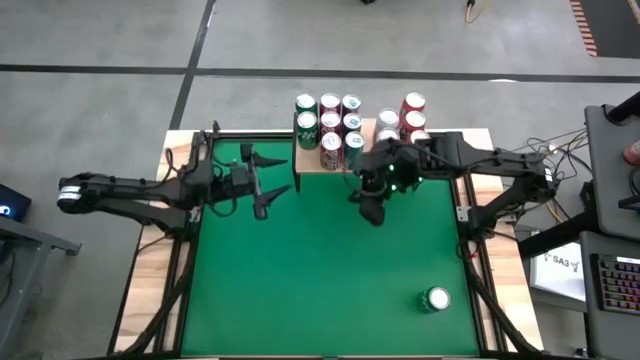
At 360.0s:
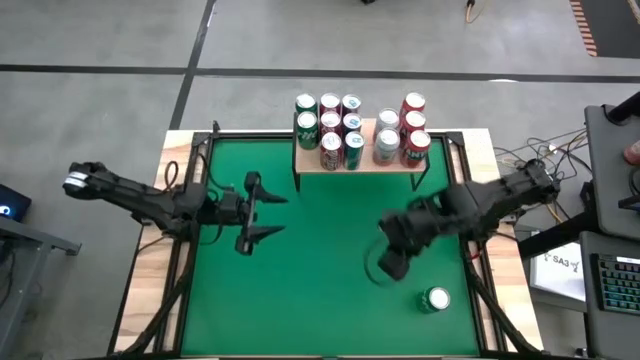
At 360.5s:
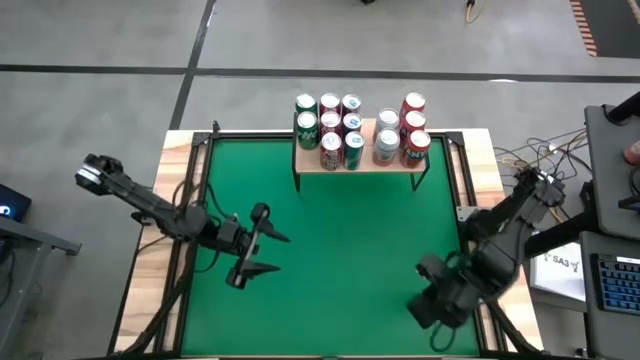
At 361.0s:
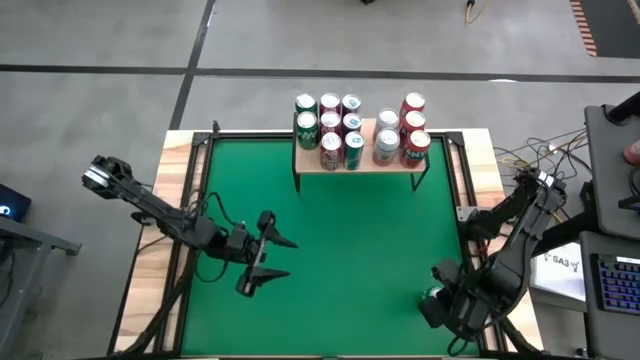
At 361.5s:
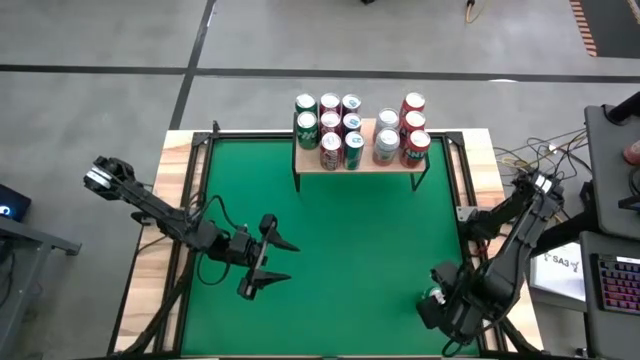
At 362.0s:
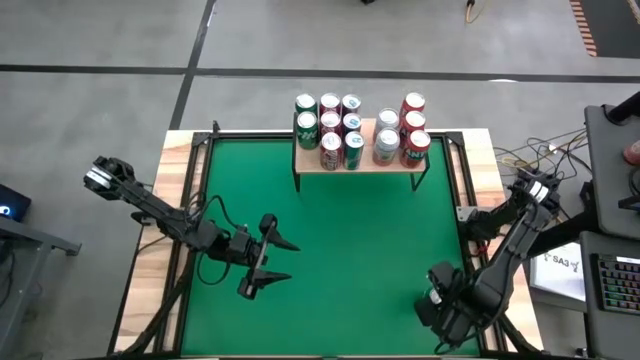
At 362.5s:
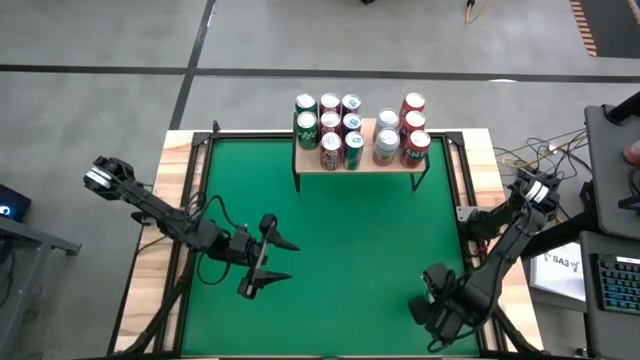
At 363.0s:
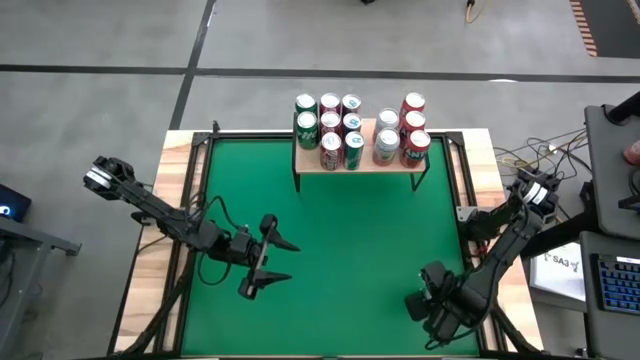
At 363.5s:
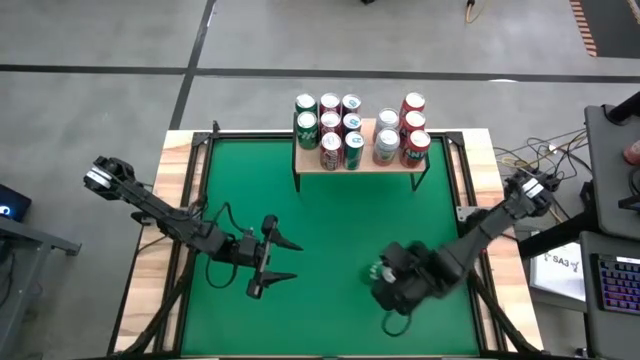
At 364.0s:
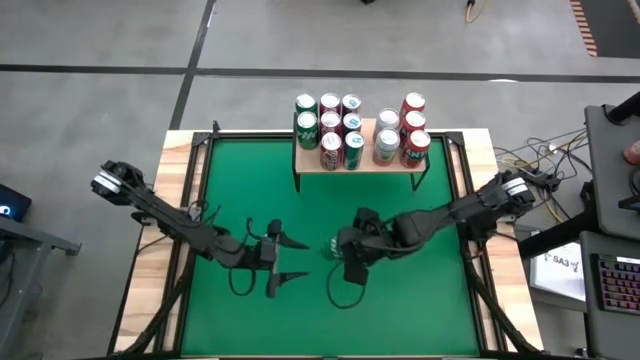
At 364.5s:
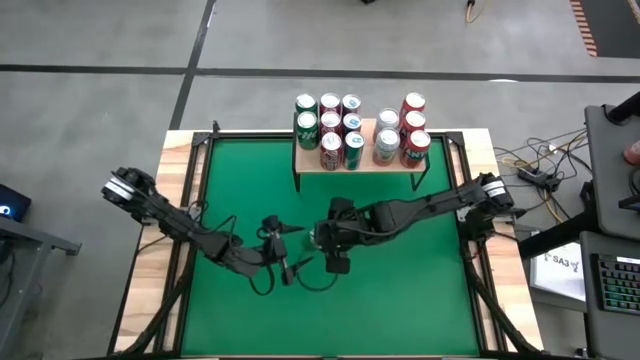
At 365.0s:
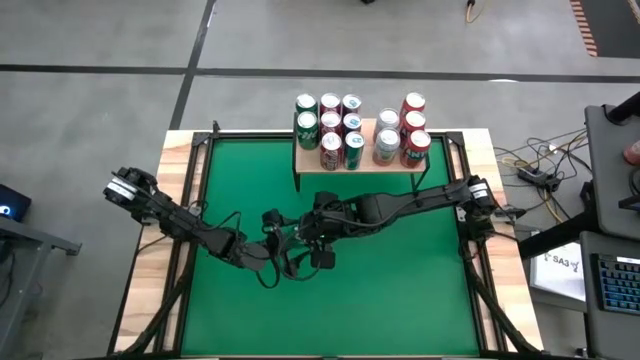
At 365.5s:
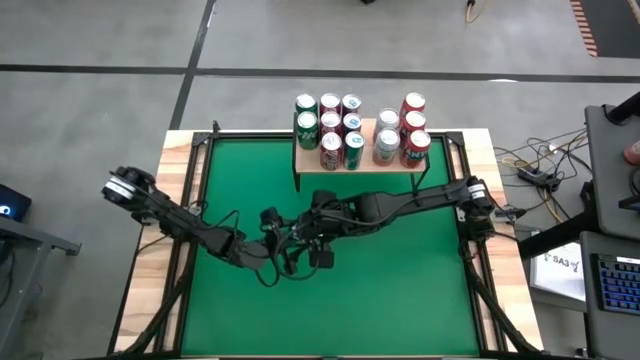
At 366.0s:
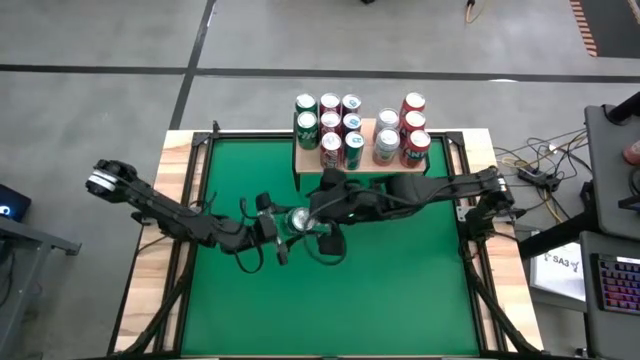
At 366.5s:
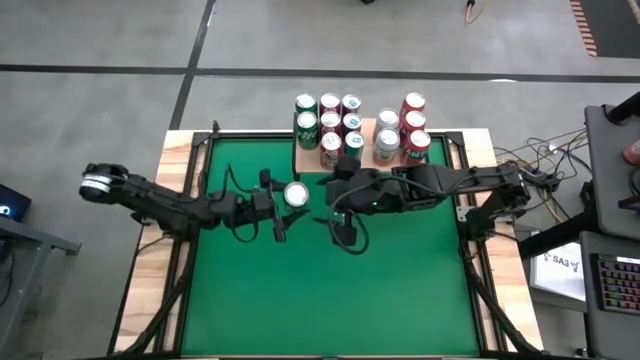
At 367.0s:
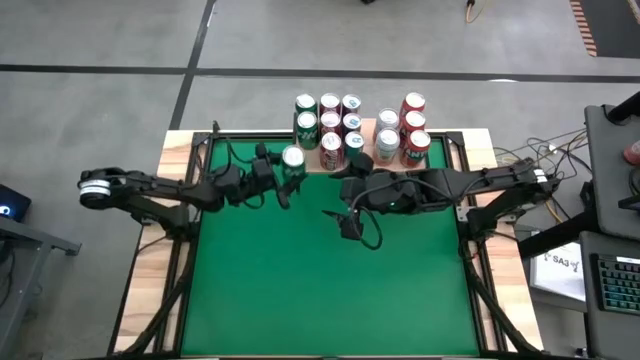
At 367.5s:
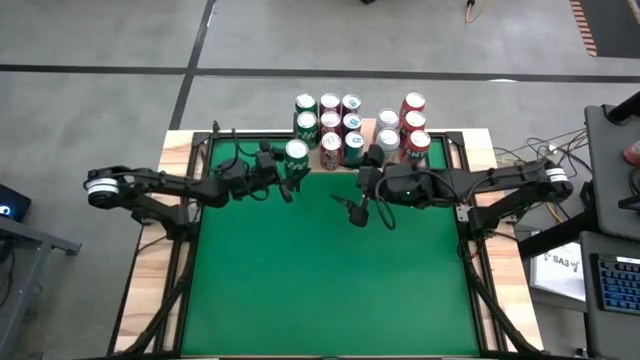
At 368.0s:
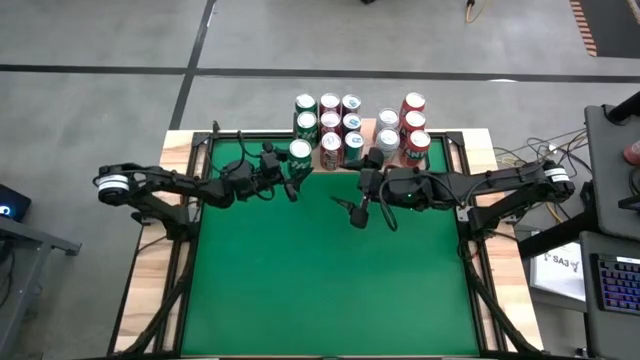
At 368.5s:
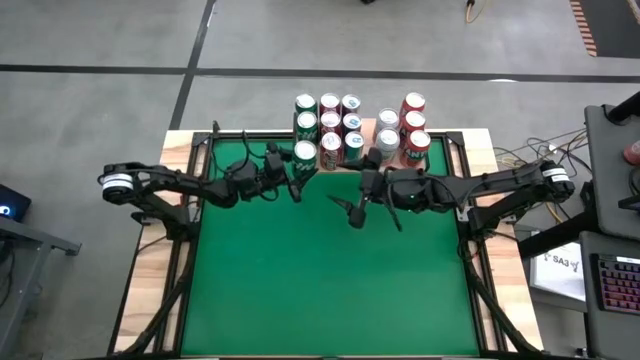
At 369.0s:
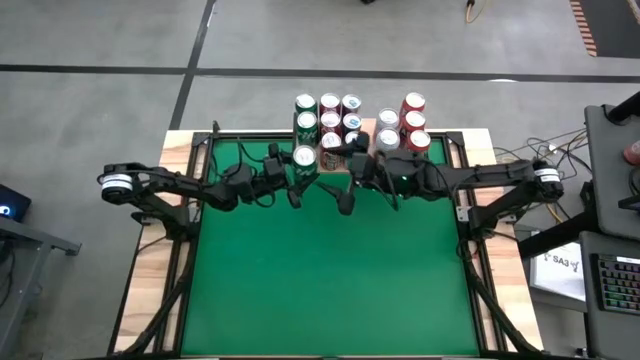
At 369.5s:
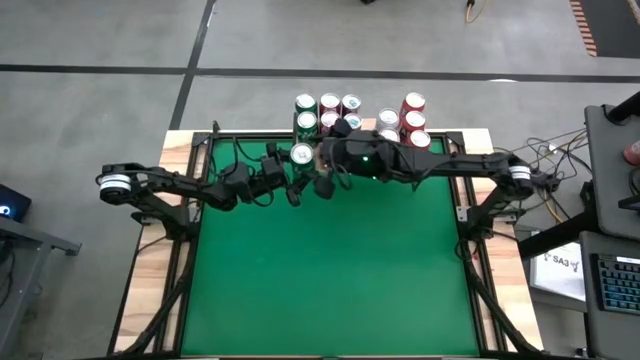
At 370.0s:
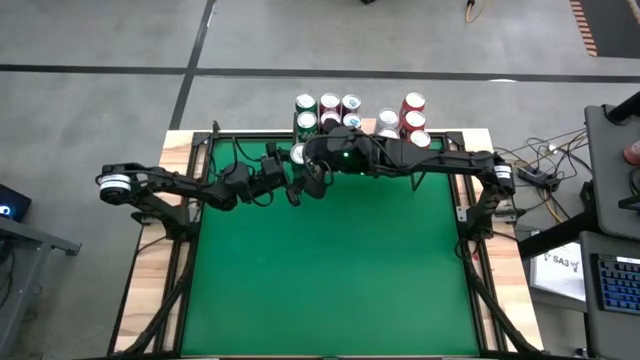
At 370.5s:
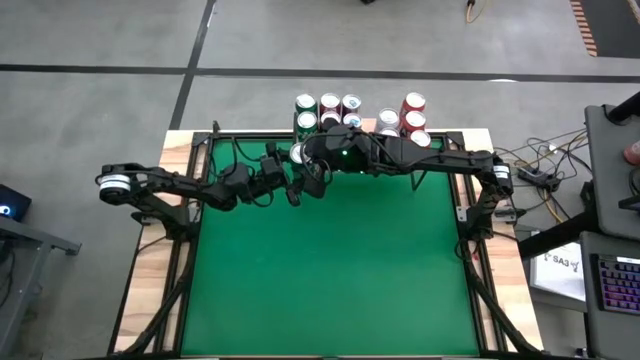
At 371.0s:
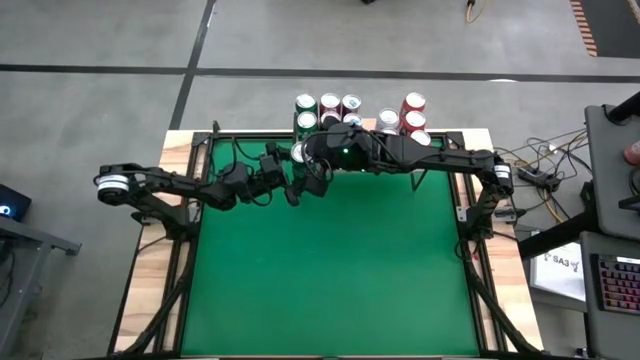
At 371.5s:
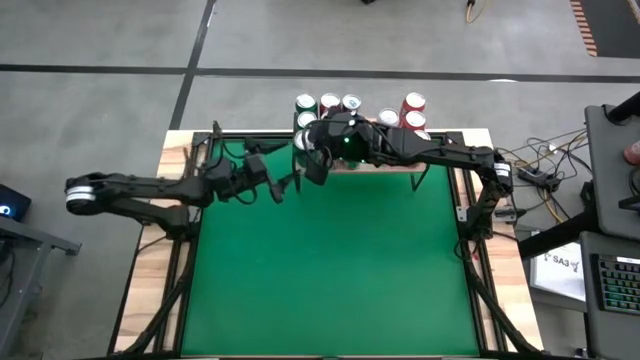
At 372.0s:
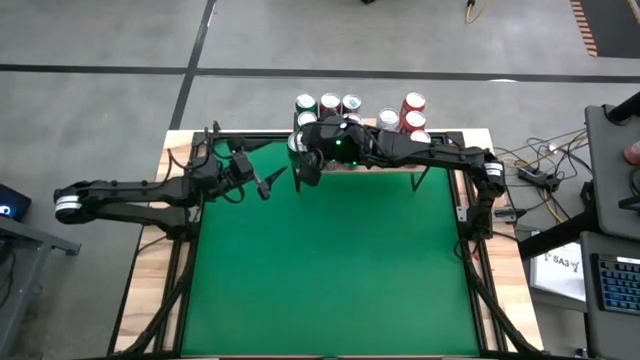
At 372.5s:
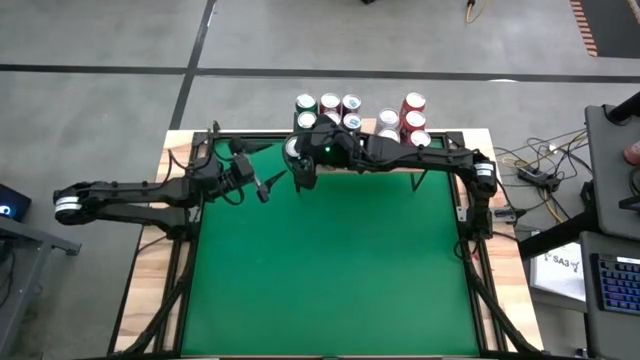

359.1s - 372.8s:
Task: Place canned beverage on shelf
Put the green soda can aligned with the green soda can on the shelf

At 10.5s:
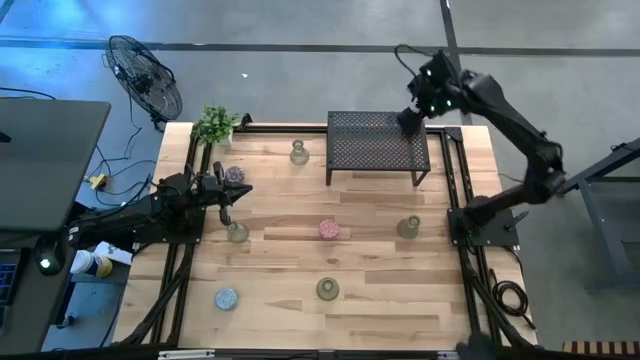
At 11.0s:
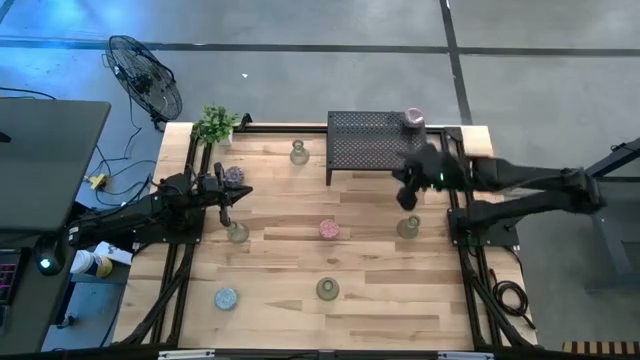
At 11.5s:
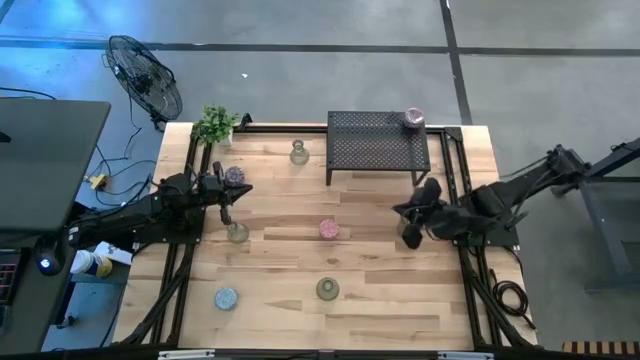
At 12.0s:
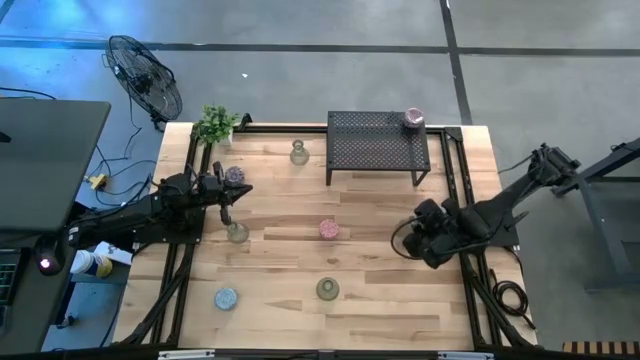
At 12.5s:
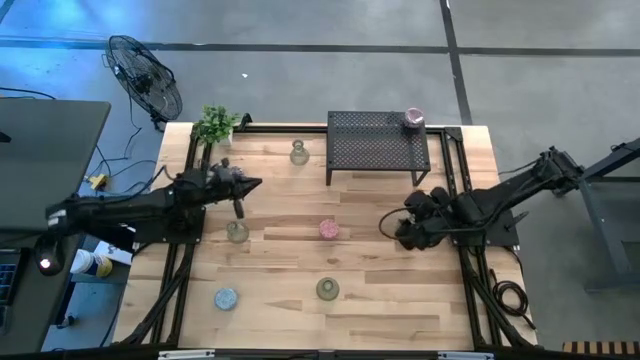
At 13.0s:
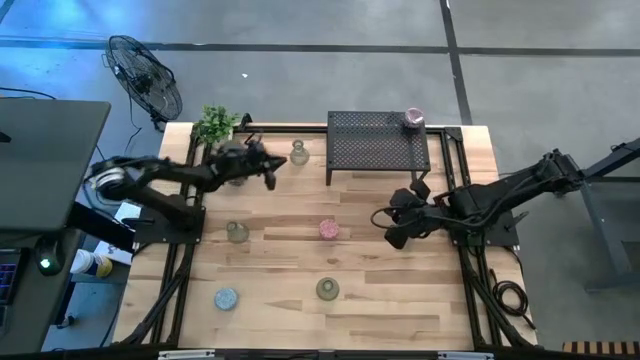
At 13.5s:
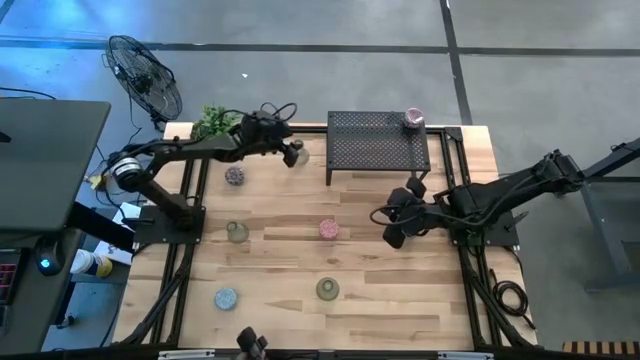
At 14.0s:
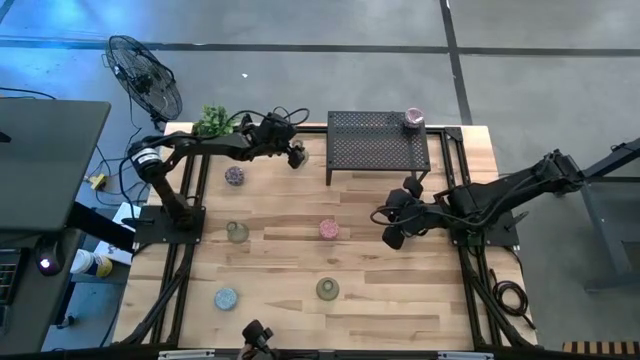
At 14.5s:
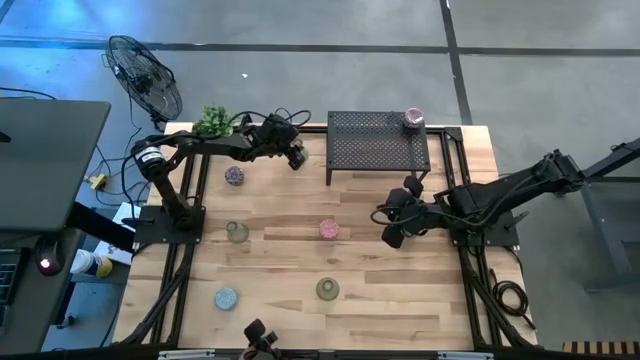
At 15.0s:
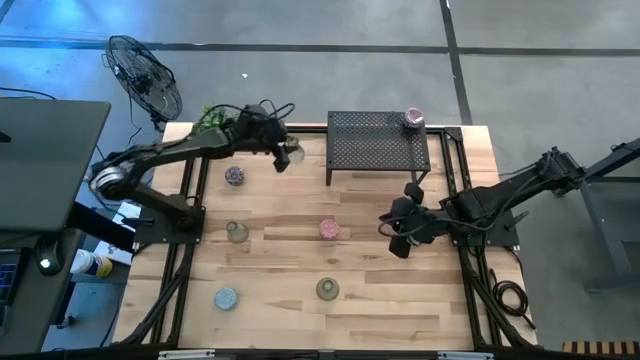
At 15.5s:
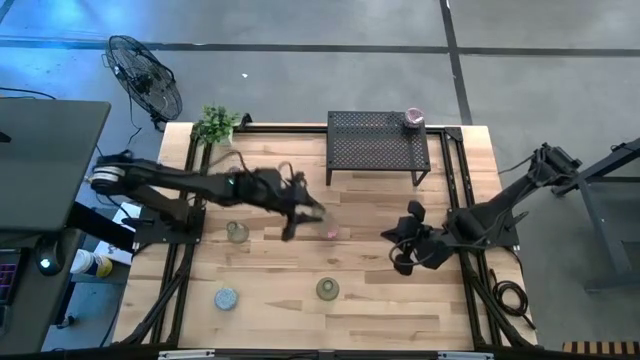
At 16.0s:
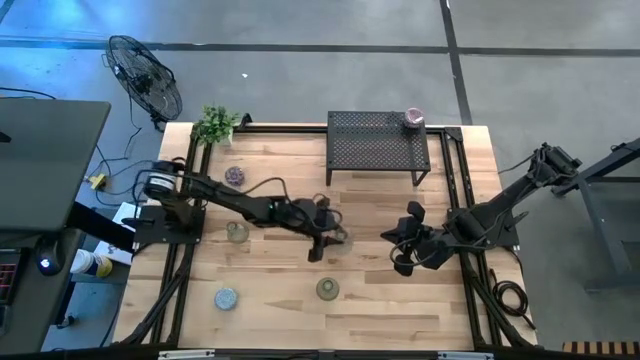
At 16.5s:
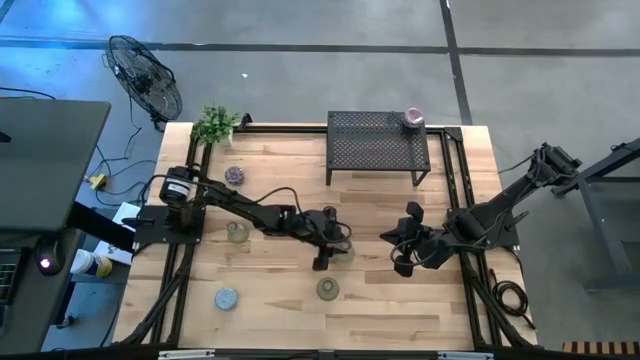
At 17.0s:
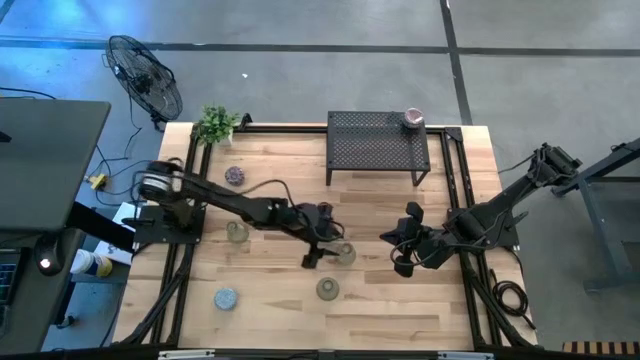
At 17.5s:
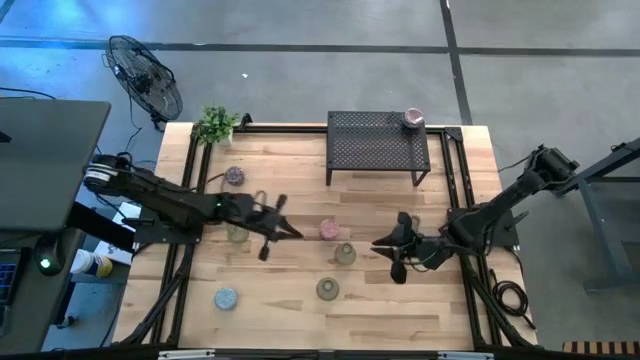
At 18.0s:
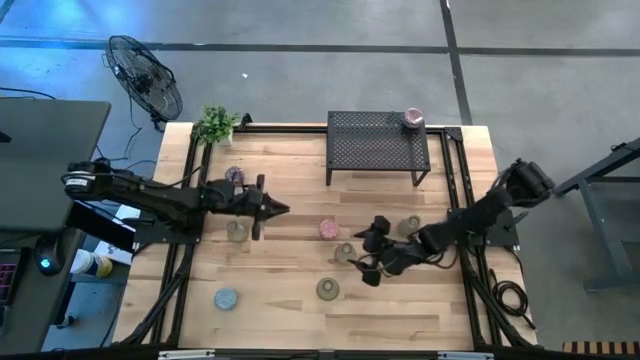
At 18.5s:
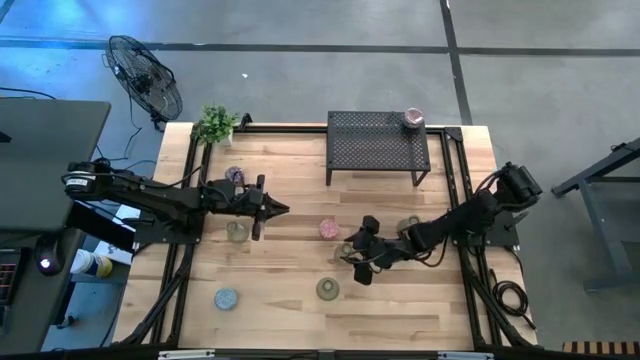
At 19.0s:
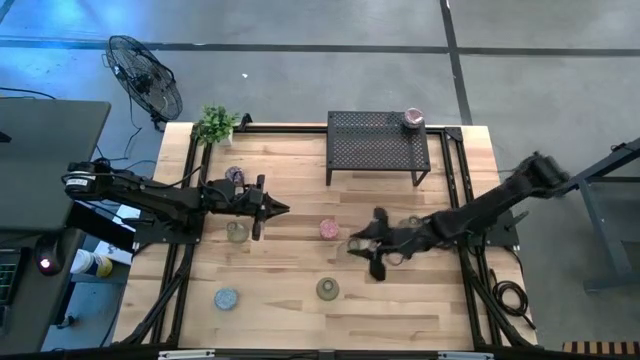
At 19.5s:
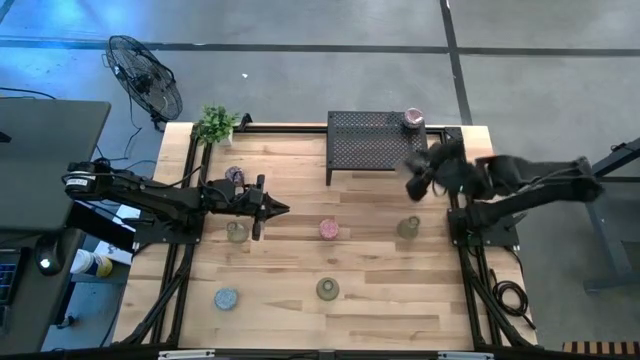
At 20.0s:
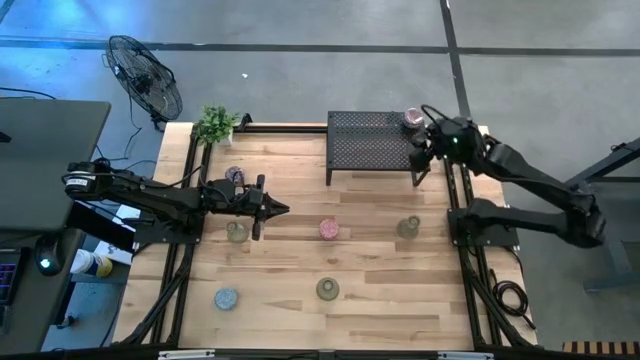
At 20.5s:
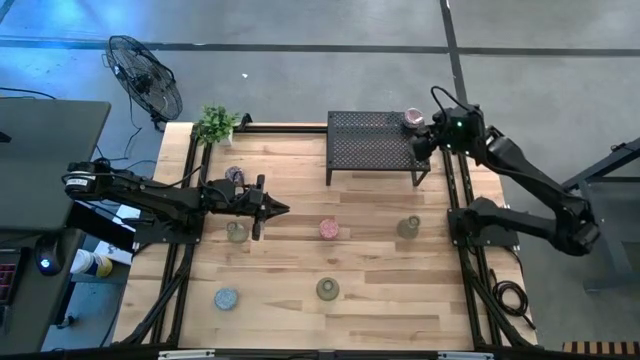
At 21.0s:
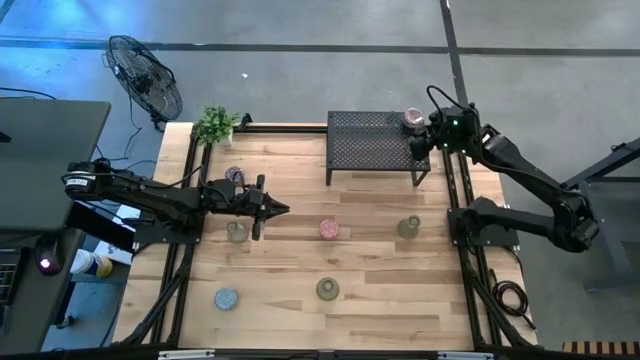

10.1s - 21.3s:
Task: Pick & Place candle stick holders
Put the green glass candle holder on the shelf
